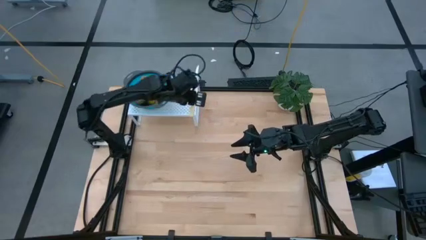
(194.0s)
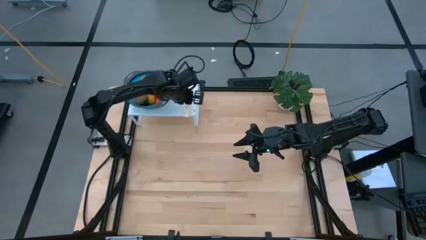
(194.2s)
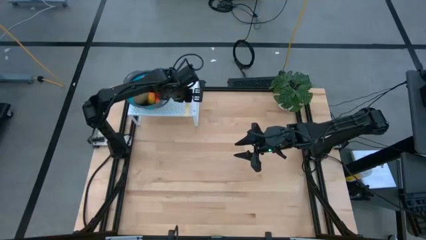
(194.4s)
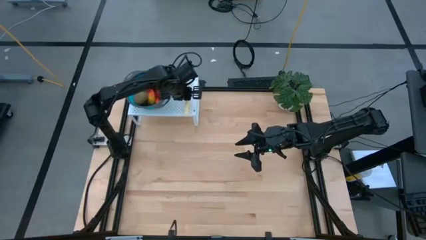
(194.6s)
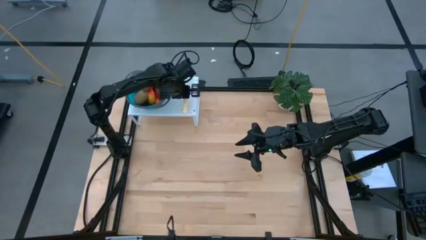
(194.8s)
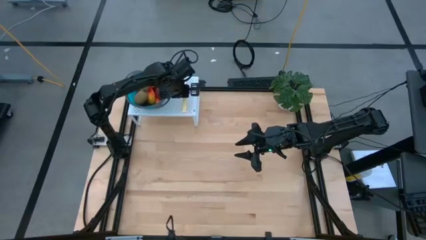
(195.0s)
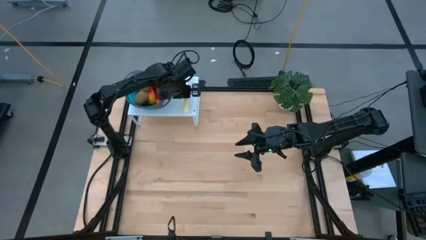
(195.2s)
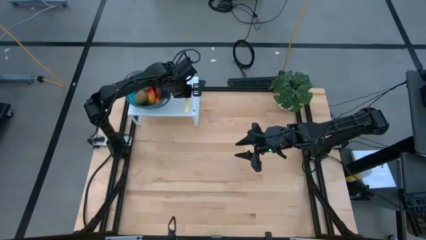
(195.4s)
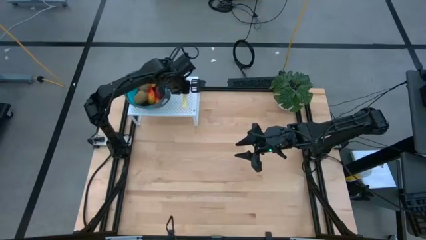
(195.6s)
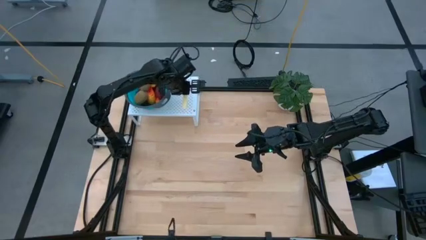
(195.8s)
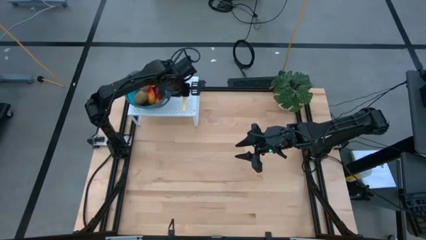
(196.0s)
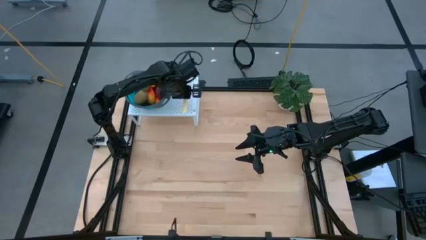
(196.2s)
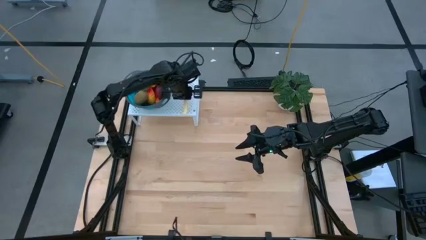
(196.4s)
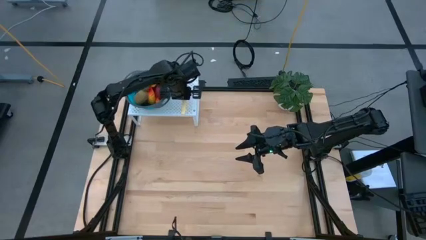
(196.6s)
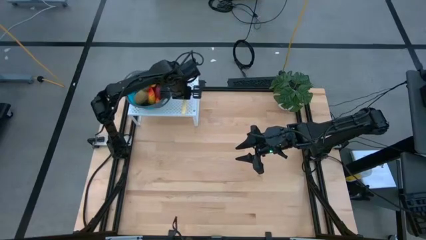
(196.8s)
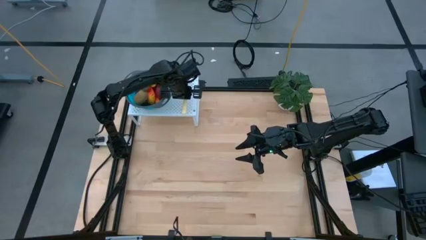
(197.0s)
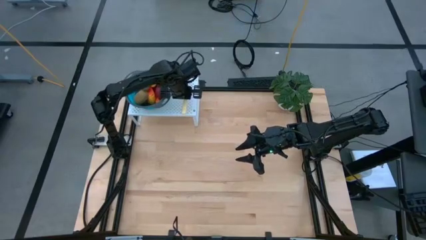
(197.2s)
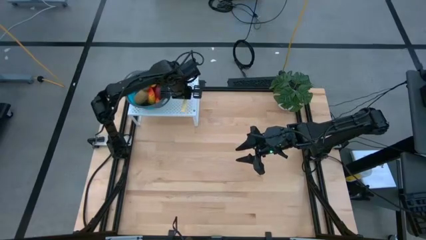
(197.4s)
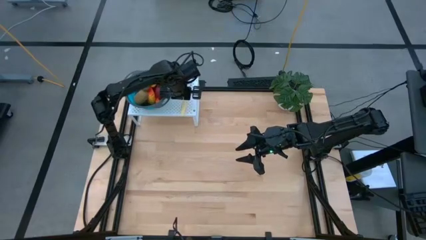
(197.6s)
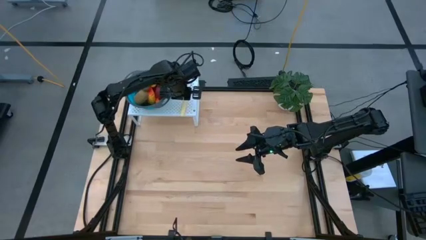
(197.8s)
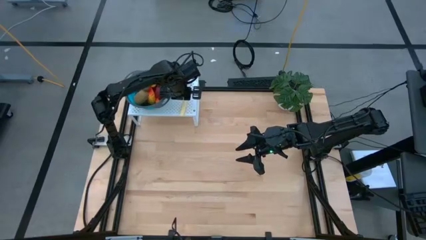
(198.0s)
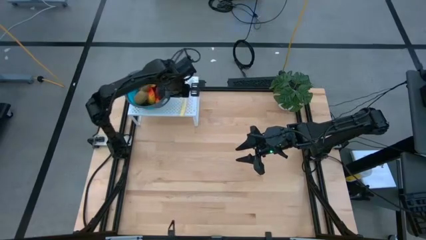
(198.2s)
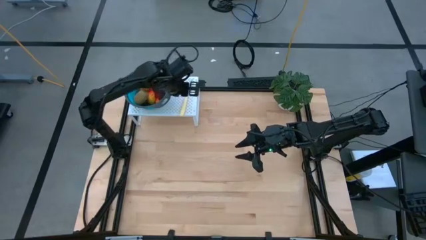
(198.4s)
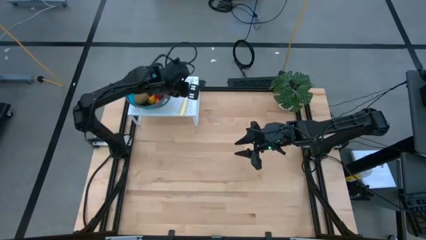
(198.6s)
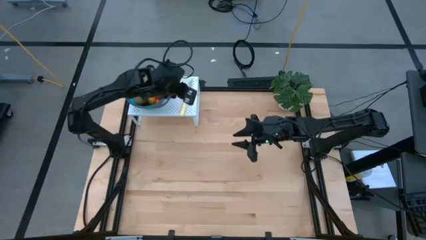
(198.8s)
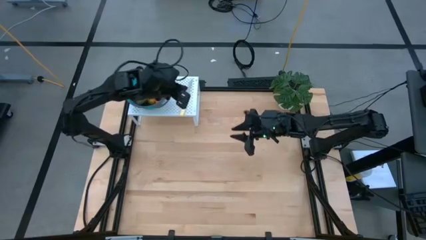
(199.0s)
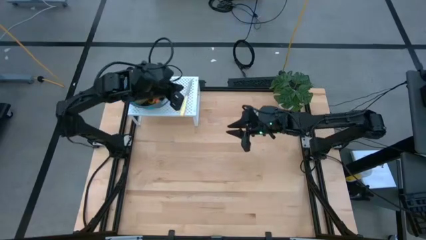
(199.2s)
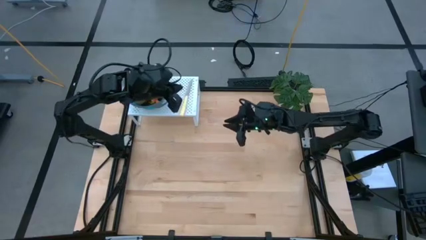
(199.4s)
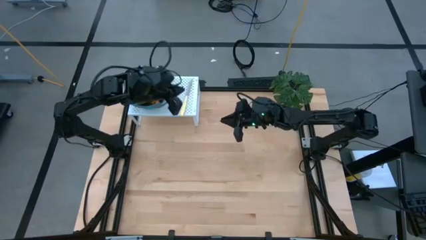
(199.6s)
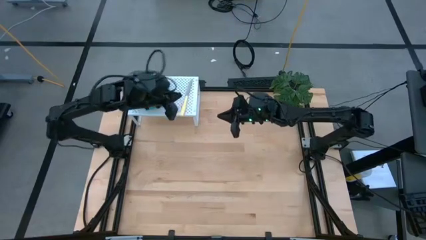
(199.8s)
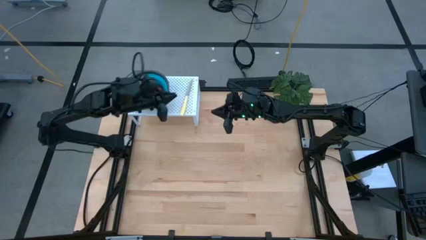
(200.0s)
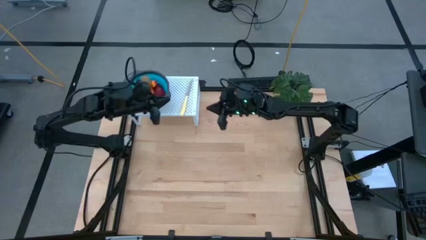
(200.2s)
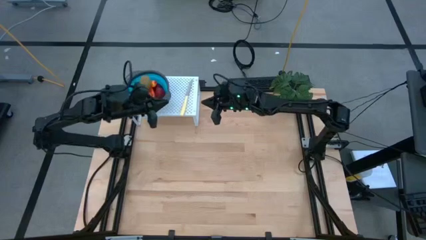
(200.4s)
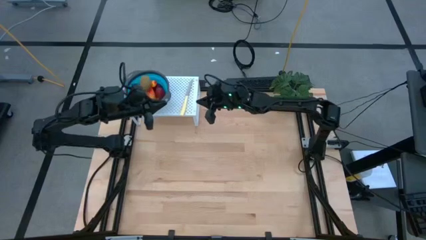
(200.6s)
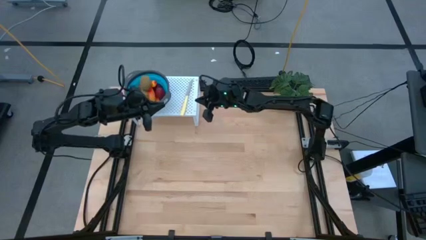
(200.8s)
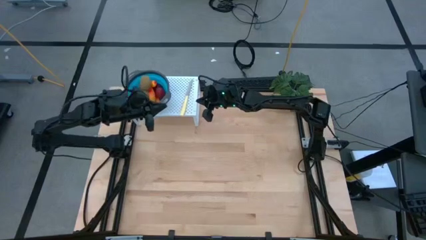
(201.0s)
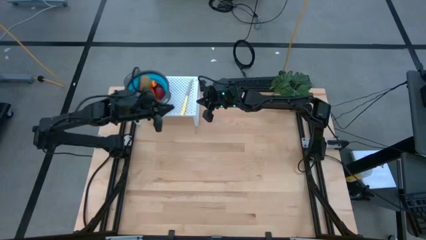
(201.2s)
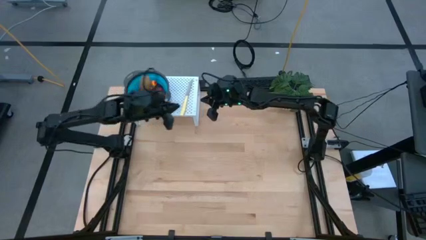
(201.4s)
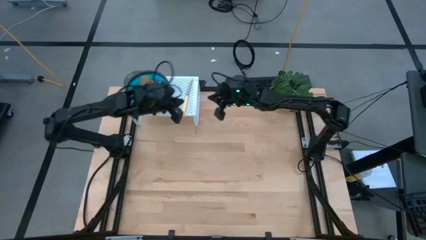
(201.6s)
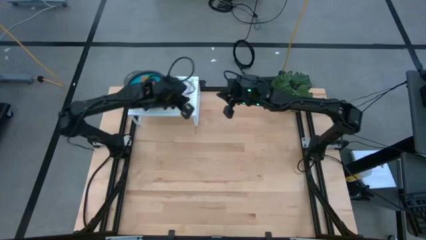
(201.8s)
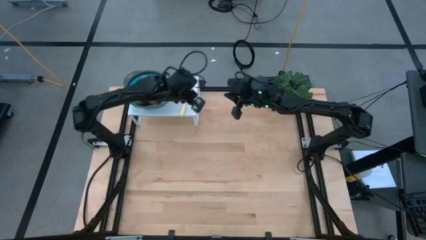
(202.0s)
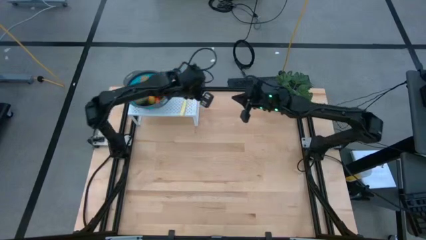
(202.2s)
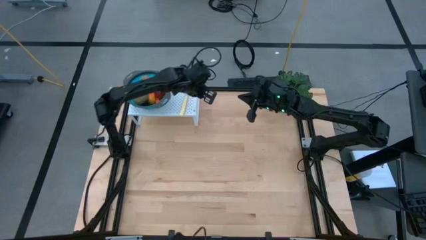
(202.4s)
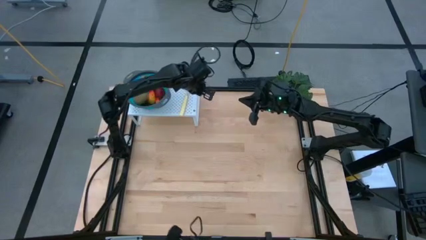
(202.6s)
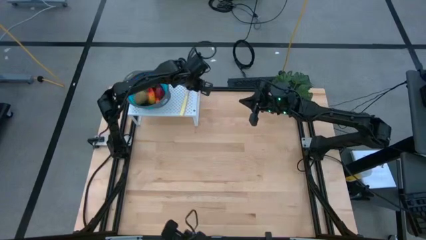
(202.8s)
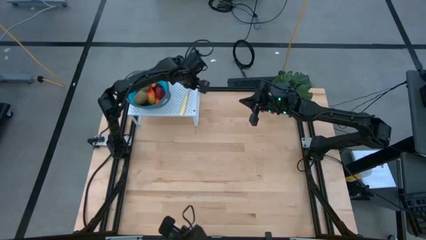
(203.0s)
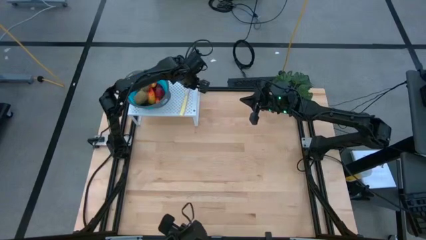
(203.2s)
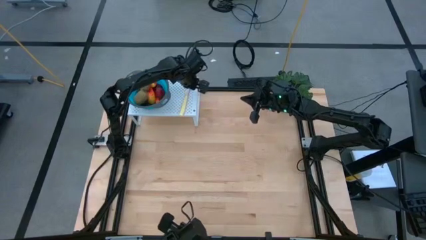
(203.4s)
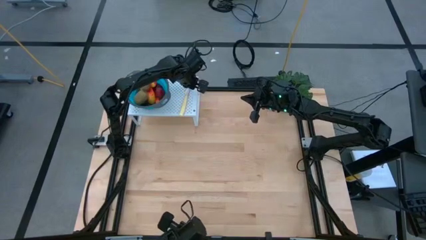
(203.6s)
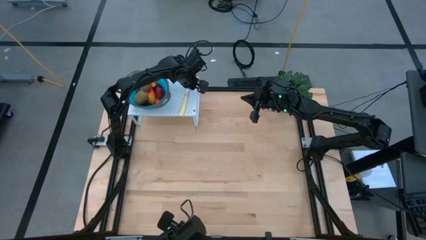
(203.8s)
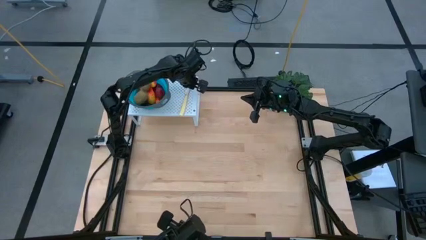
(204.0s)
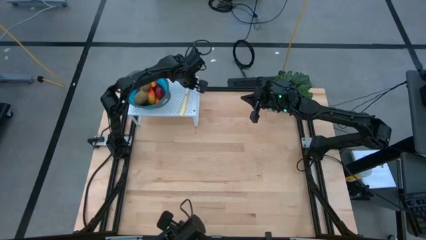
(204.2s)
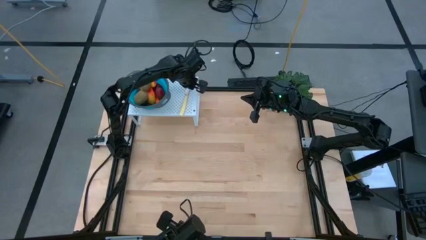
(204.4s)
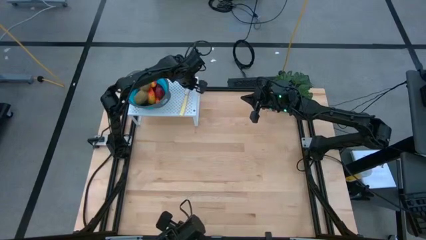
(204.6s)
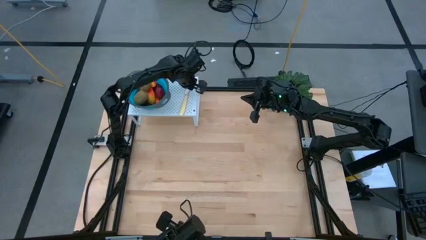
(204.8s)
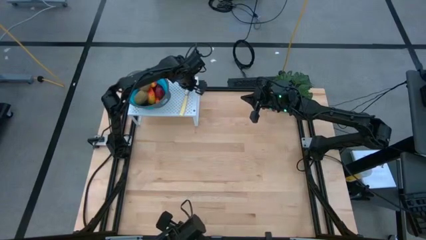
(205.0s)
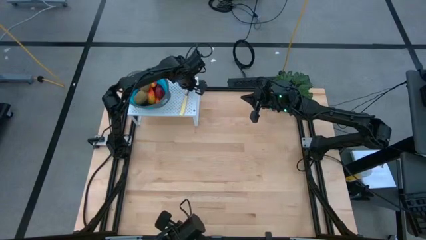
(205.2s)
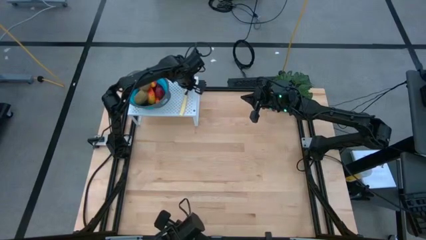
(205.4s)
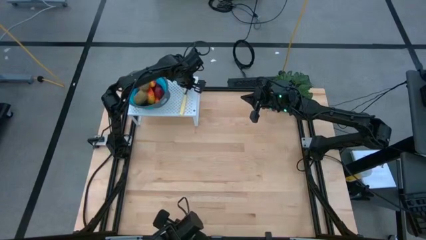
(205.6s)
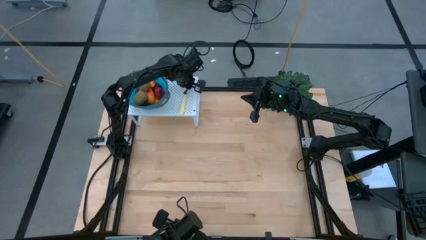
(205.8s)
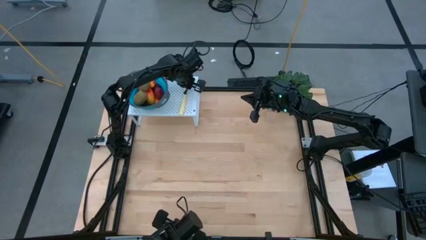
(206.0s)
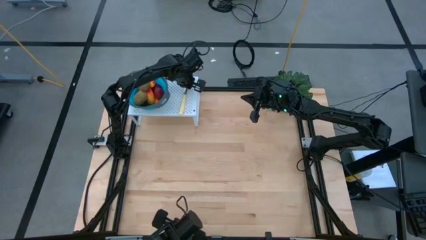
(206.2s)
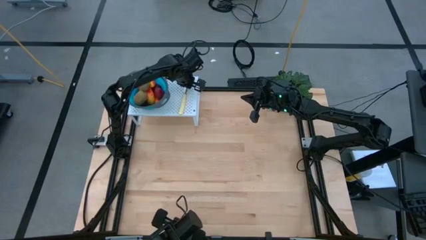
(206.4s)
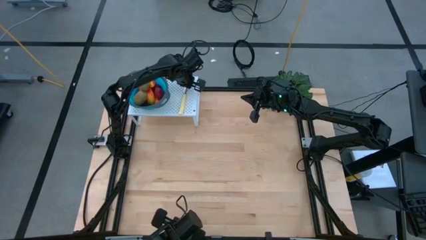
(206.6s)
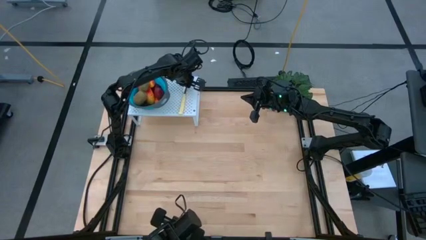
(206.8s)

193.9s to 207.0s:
Task: Pick & Place Fruit
Put the butter knife into the right side of the blue strainer bowl on the shelf

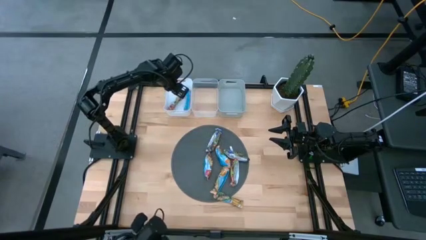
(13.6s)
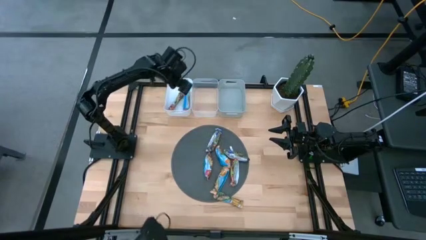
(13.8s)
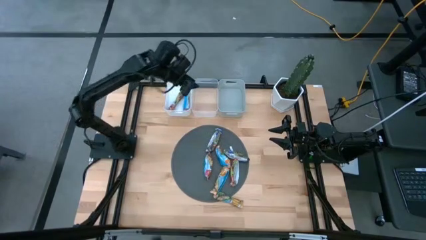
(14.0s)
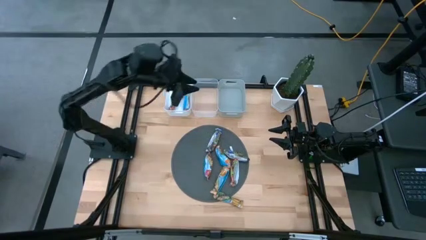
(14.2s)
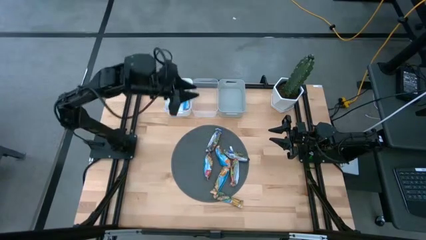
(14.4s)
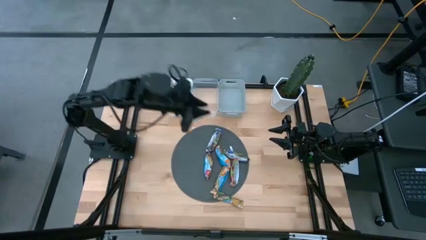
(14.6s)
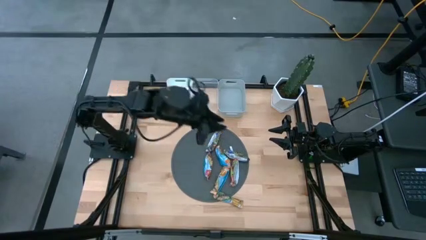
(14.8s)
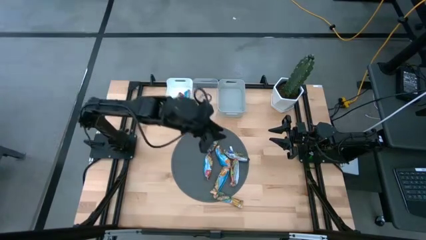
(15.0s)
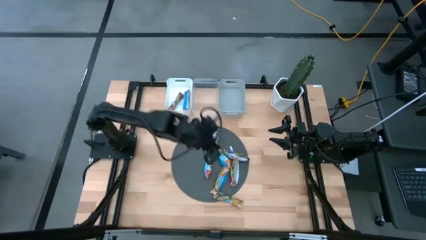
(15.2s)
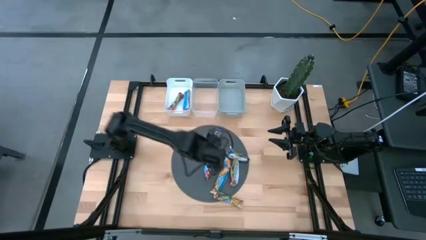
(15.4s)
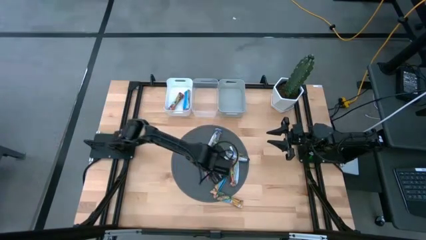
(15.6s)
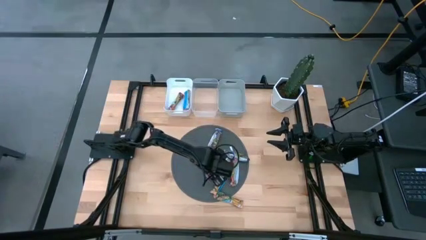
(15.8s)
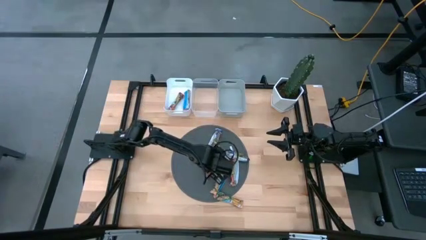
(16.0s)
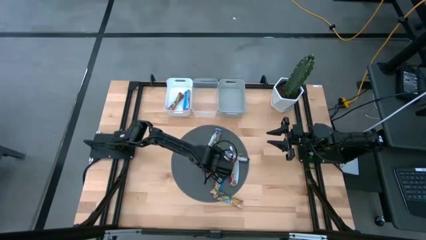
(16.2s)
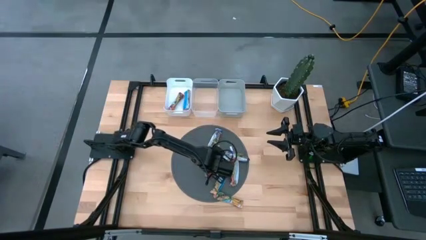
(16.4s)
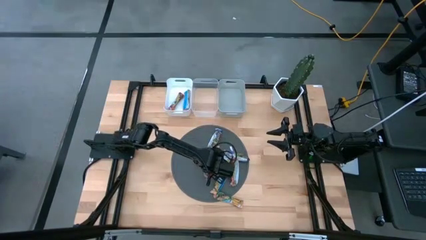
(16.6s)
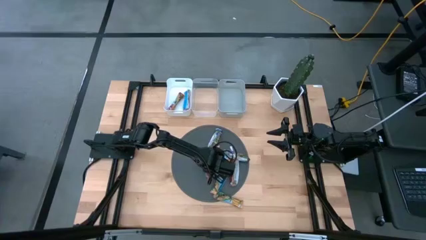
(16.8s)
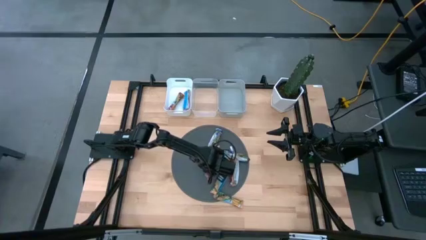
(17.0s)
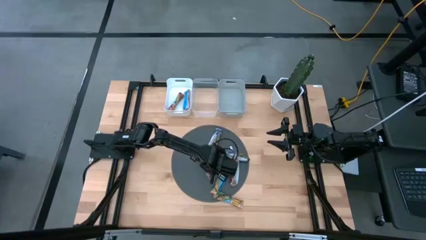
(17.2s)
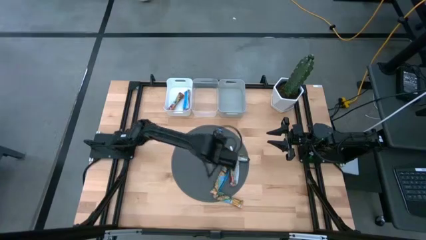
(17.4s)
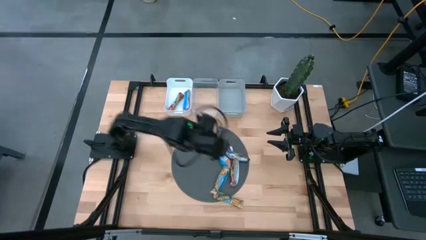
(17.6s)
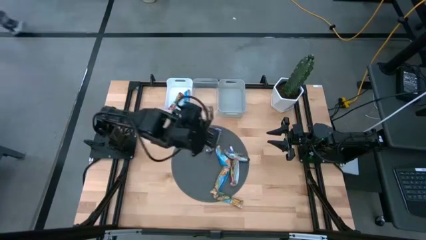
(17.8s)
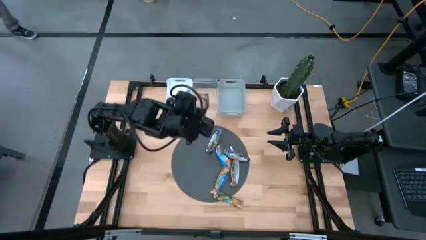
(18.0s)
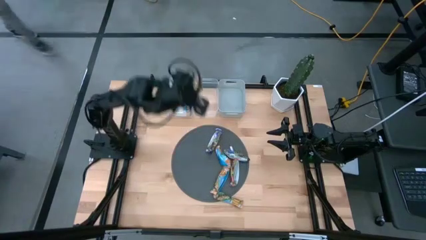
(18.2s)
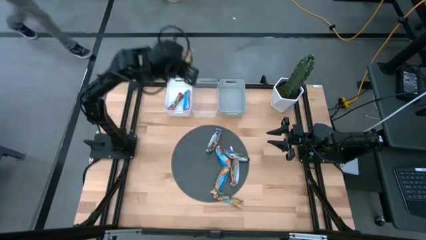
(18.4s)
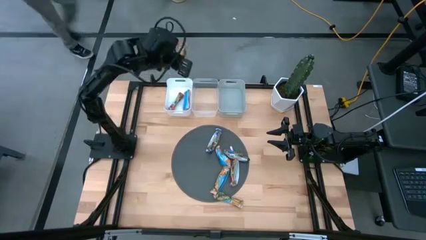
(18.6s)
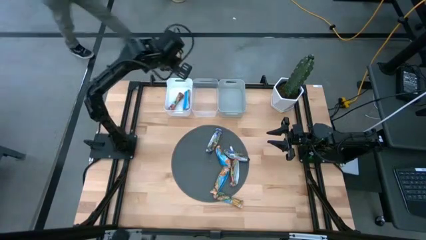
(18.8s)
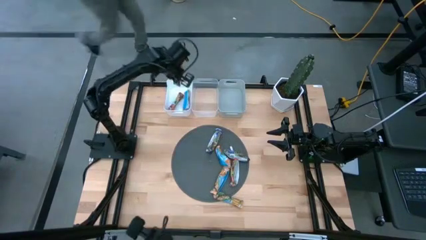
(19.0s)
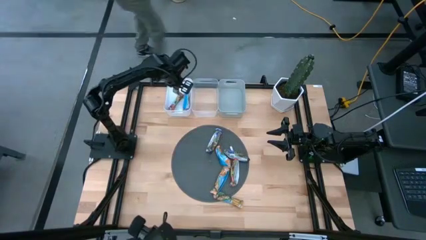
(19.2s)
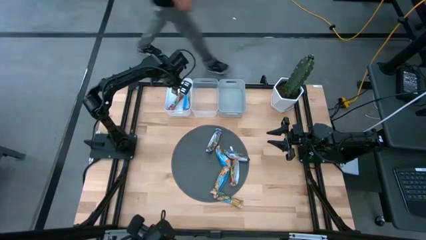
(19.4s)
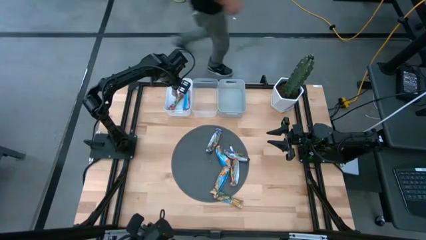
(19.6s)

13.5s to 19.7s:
Task: Pick and place Granola Bars by type
Put the red granola bar into the white bin
